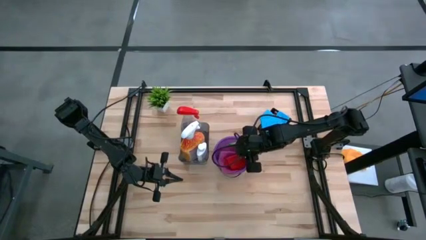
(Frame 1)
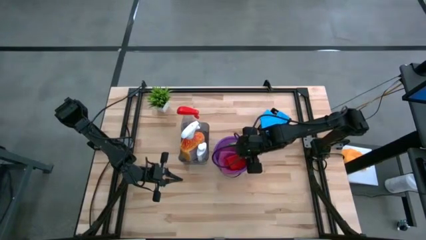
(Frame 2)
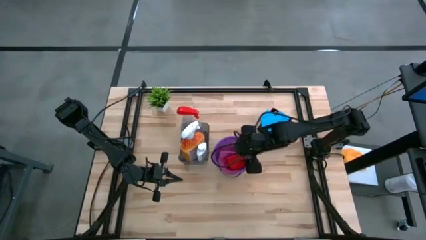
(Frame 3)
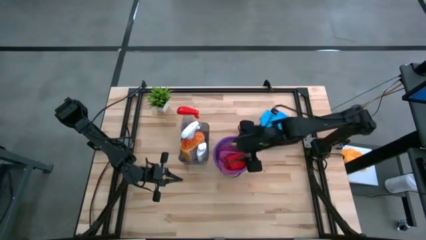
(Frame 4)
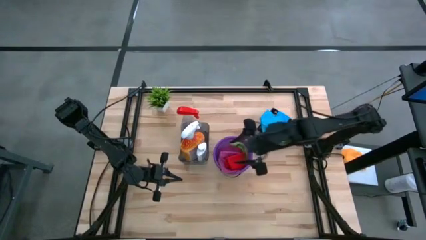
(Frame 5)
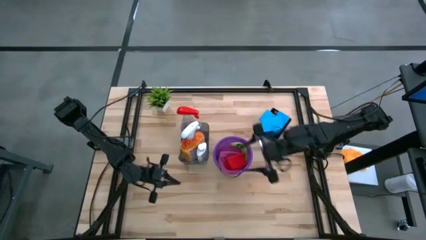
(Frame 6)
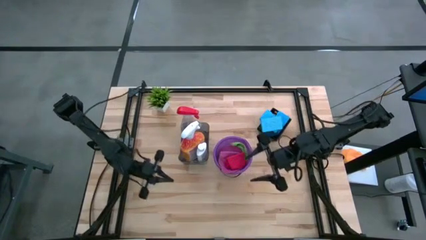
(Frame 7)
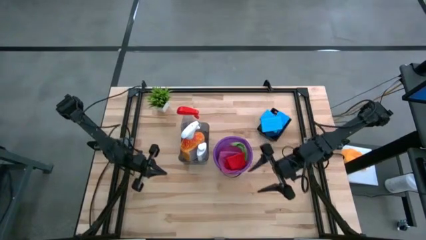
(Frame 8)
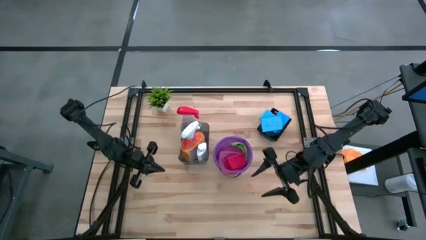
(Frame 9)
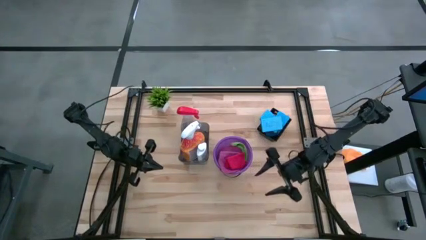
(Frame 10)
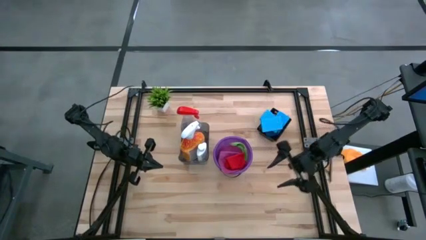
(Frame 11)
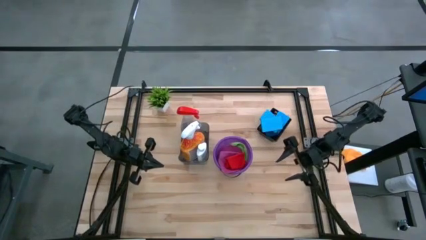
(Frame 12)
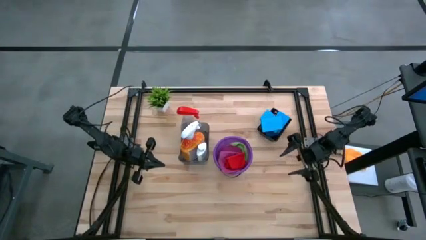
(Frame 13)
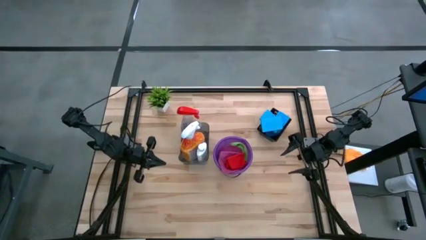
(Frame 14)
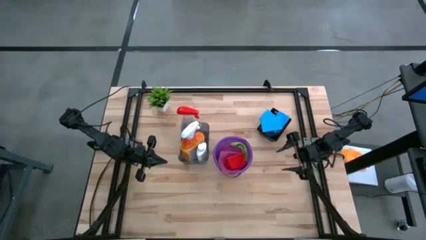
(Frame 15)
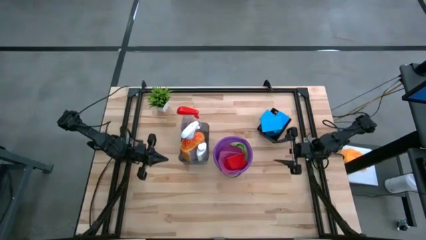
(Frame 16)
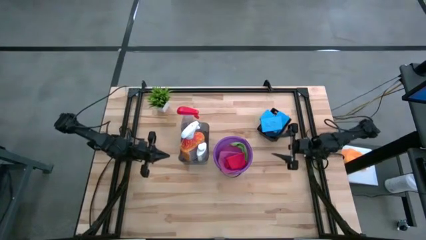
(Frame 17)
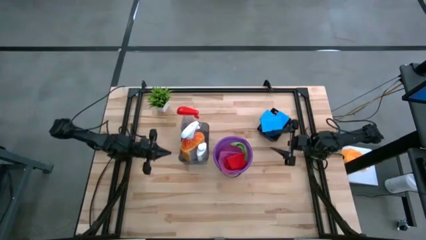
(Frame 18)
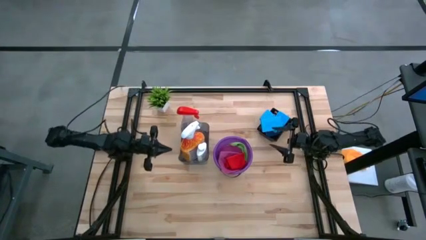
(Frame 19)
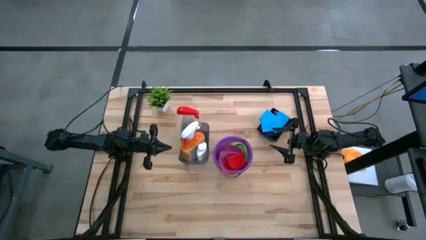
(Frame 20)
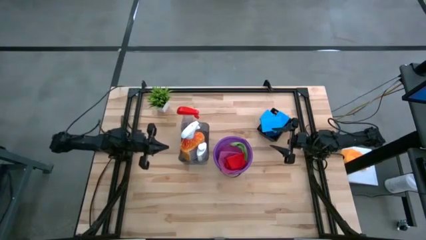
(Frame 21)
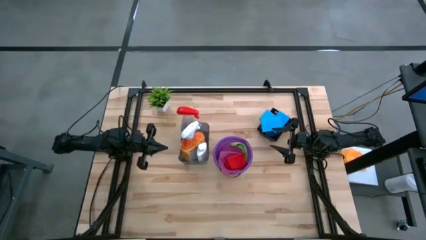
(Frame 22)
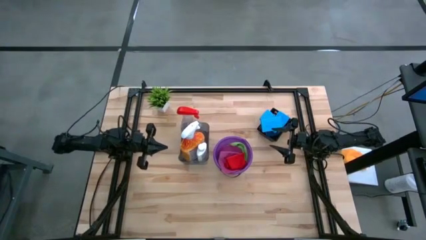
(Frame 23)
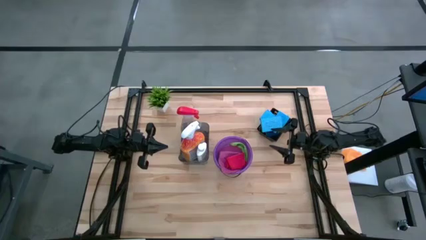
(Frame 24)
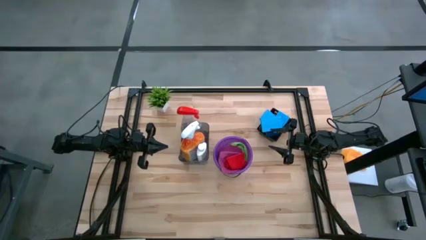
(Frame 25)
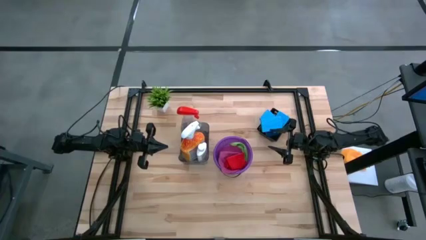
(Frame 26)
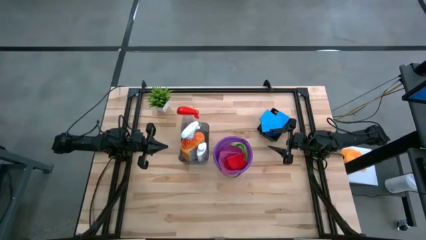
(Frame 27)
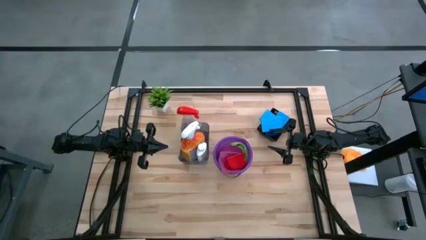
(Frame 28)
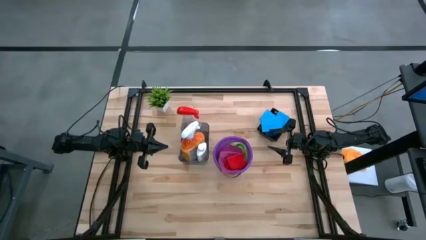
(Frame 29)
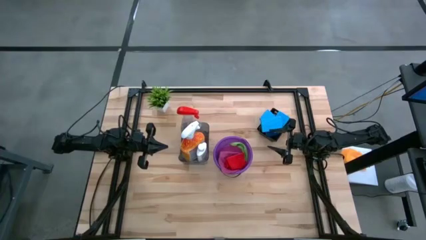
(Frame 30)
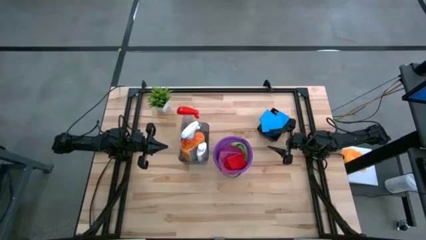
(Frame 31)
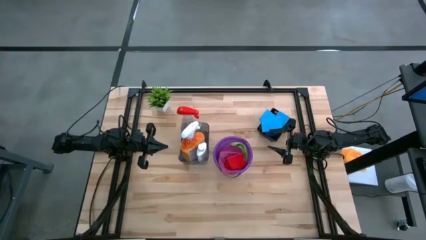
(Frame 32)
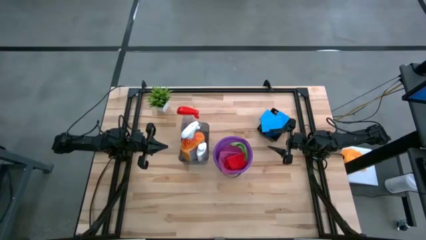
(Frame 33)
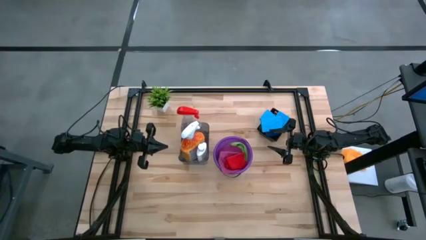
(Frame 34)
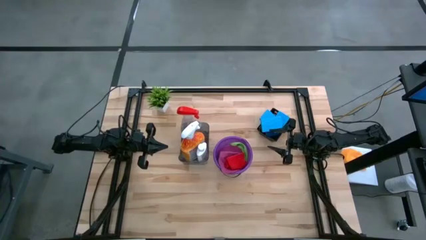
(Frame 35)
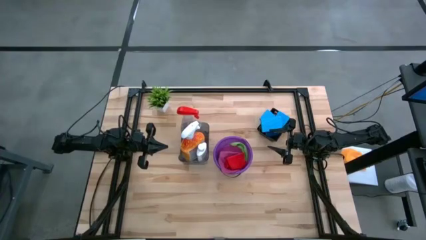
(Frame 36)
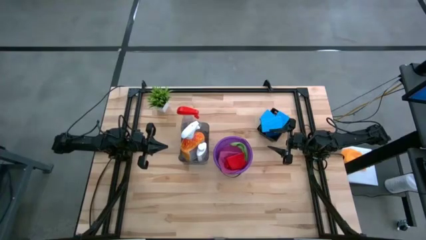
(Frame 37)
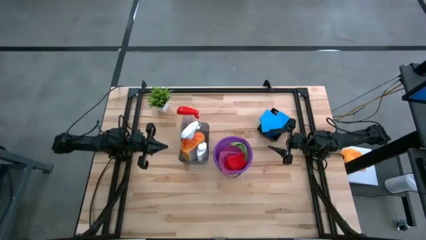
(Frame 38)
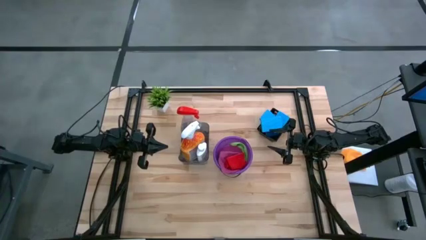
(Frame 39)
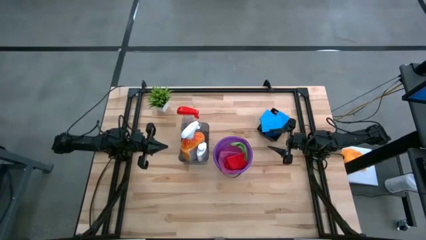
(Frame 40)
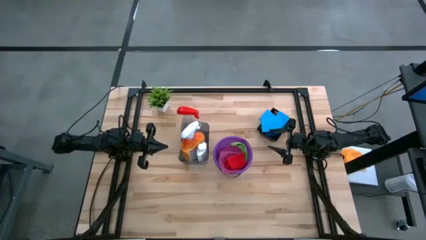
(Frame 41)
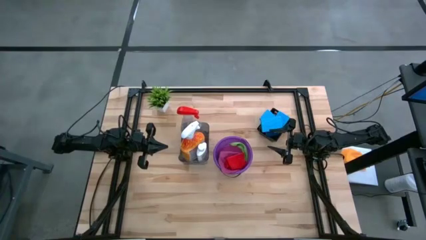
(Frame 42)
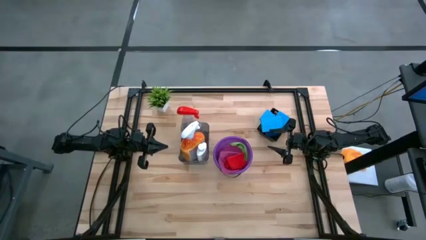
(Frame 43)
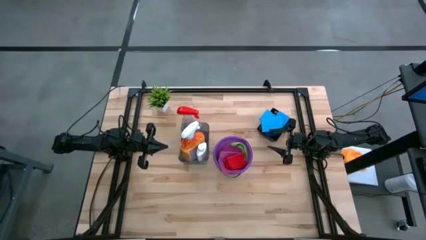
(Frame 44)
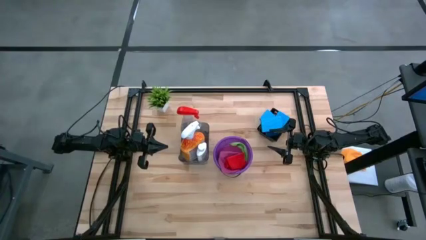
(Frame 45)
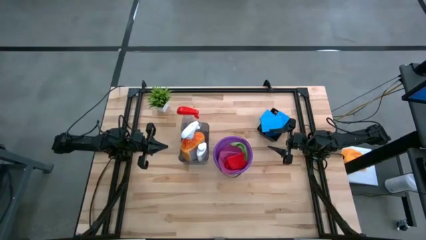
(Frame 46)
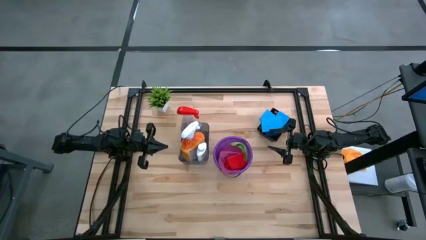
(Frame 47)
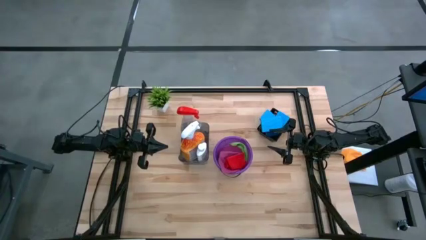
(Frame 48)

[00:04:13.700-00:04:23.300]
Task: Pick & Place Kitchen Items
Return to Home Position

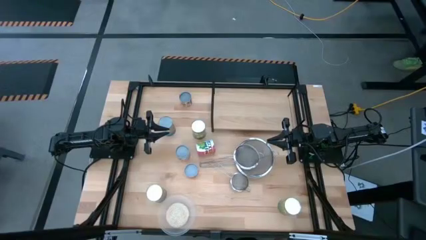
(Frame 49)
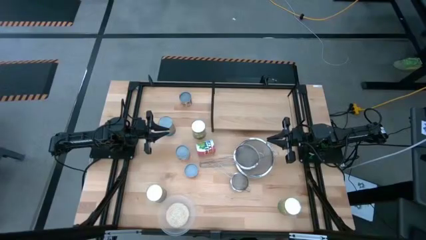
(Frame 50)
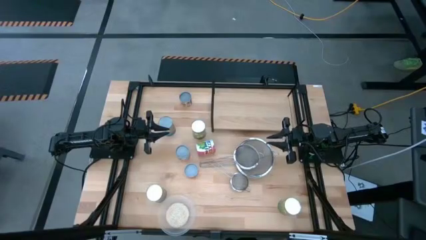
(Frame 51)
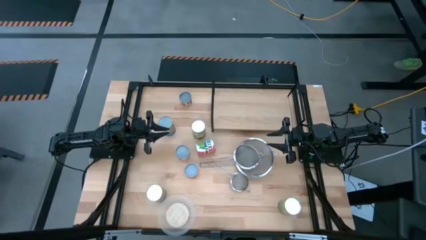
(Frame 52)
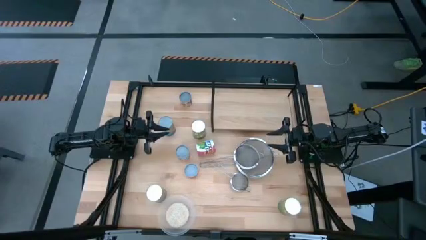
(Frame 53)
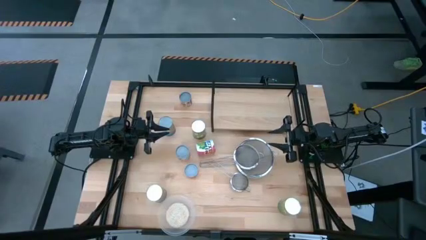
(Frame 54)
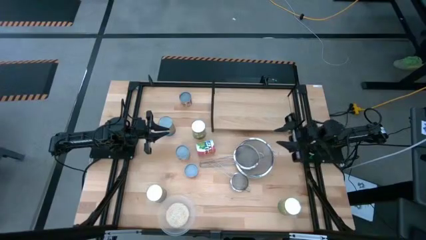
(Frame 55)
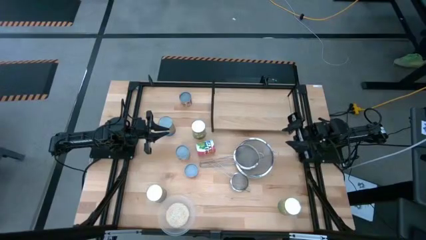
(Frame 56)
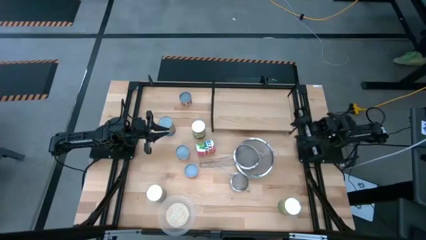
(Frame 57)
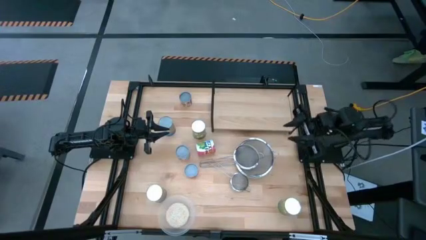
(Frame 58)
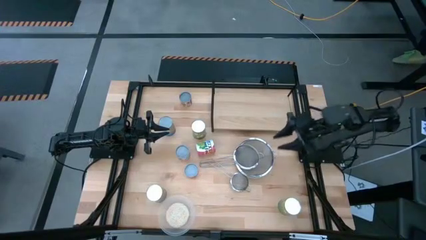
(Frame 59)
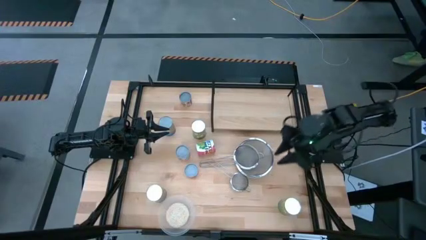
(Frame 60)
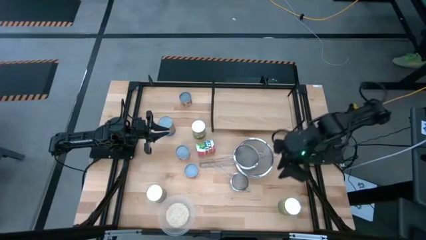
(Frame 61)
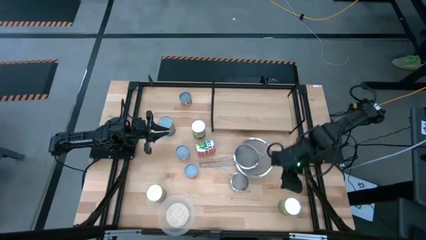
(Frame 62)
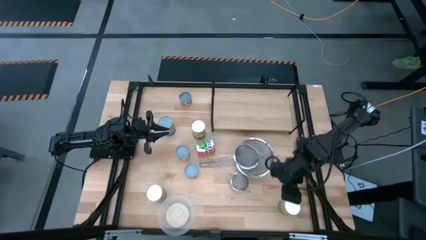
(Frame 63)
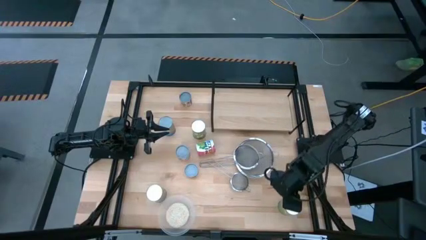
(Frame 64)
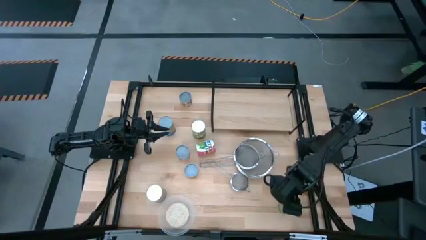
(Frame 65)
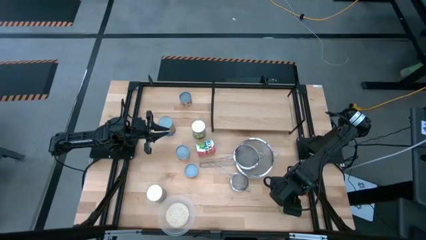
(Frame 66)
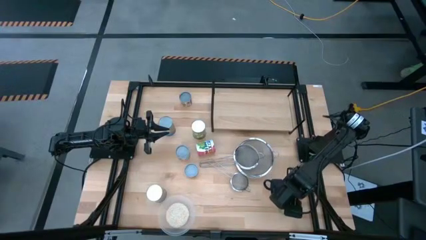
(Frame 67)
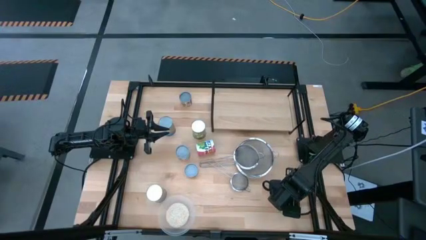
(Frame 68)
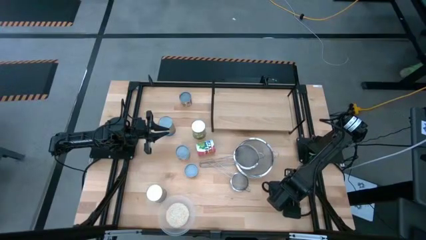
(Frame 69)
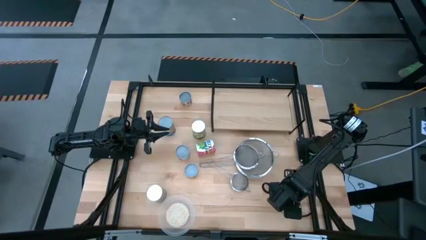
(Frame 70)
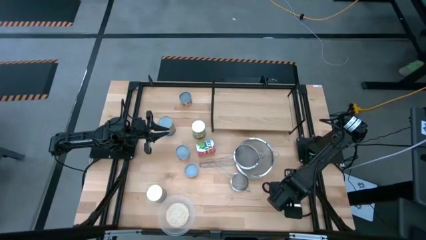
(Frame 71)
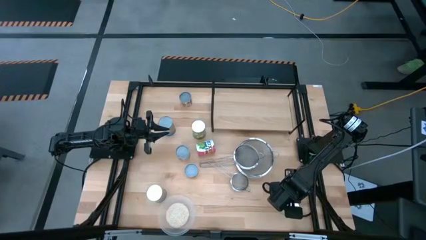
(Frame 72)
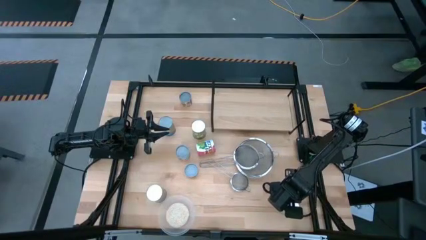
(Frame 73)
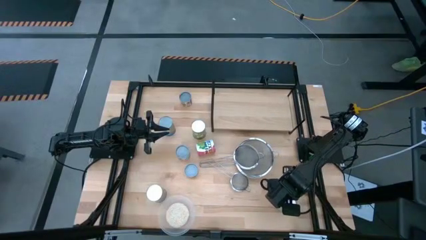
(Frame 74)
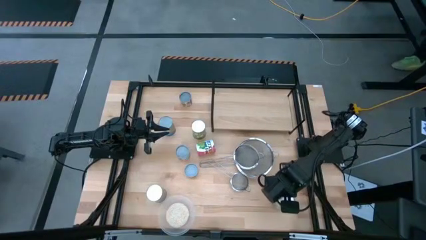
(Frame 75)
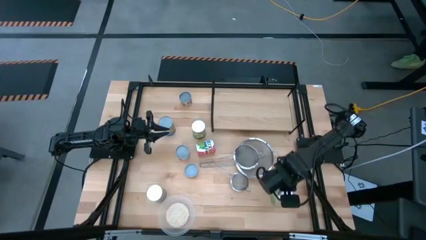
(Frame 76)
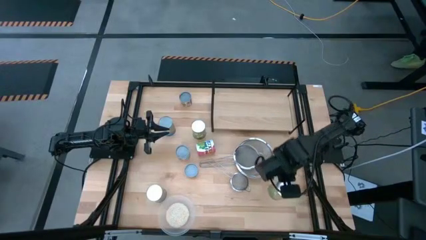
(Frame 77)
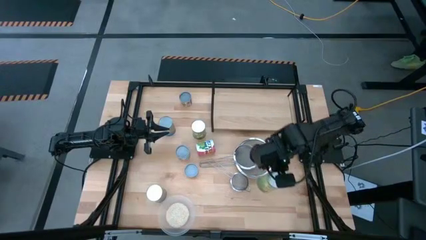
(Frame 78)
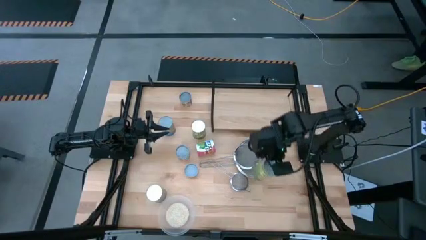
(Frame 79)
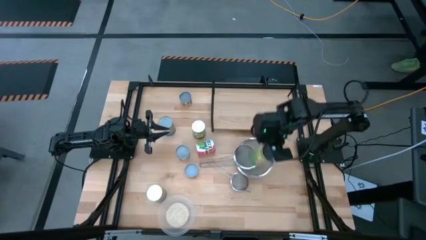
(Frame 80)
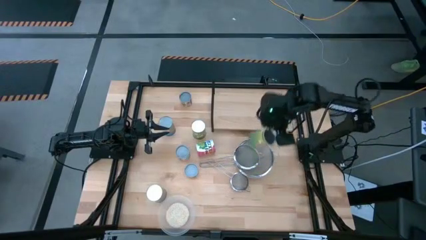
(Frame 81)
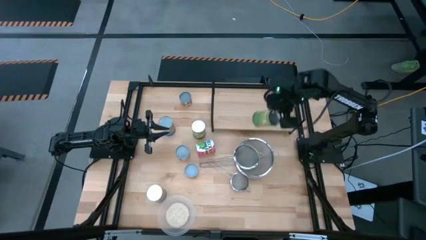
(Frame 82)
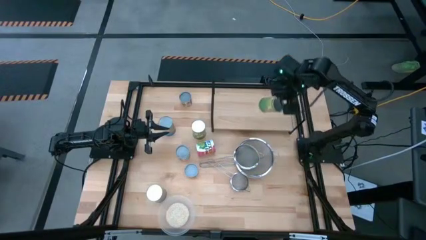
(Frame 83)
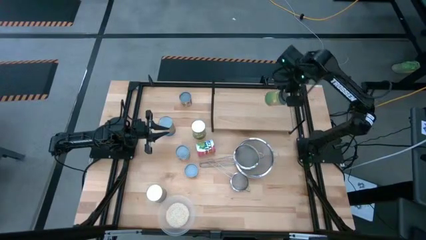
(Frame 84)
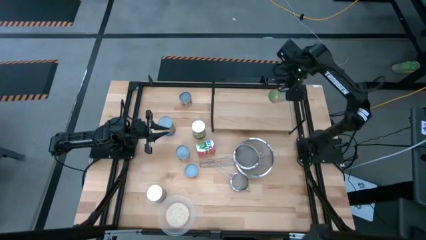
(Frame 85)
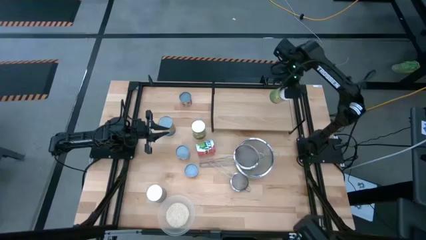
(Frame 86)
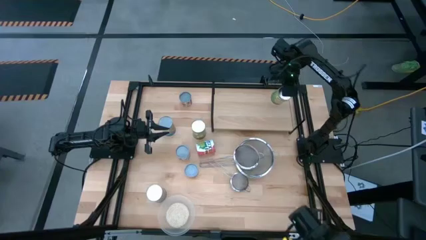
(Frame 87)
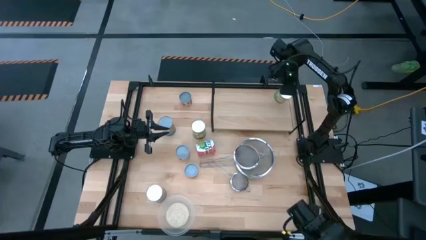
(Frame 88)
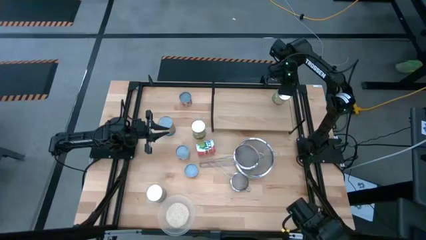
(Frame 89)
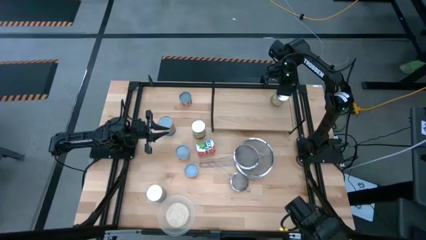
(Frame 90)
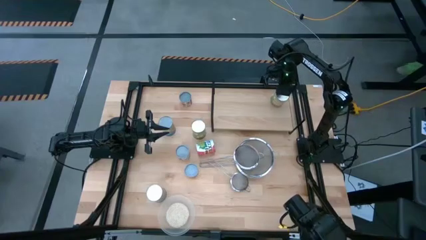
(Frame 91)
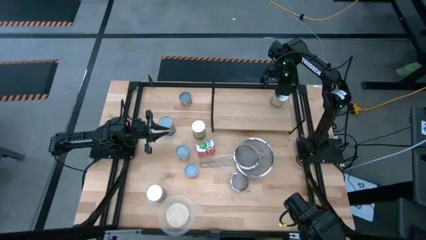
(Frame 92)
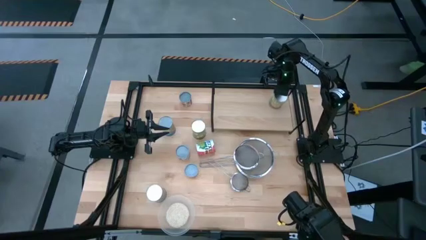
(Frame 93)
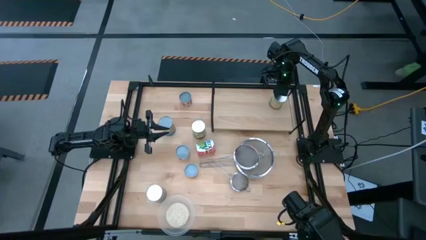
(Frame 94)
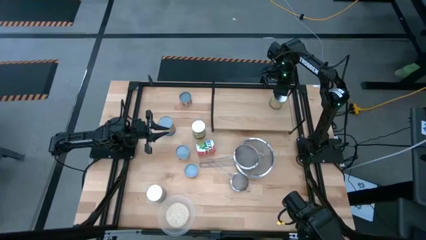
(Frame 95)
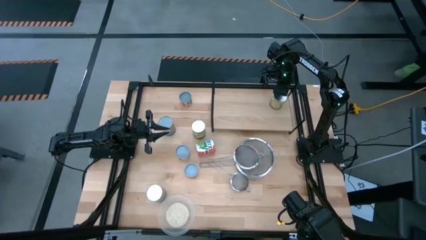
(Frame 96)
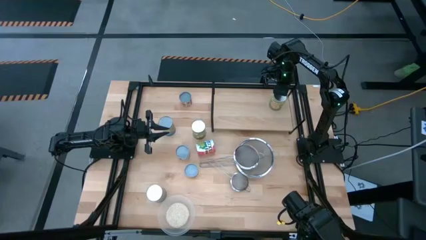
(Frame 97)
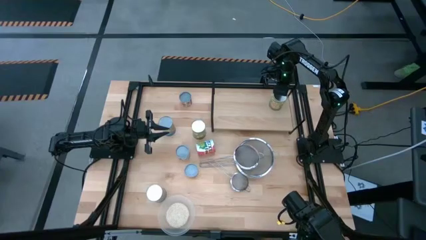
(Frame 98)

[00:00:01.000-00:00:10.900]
Task: Pick and place cans onto a shelf
Put the canned orange on the shelf
